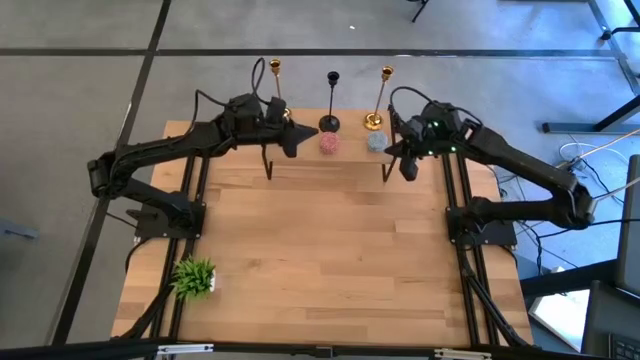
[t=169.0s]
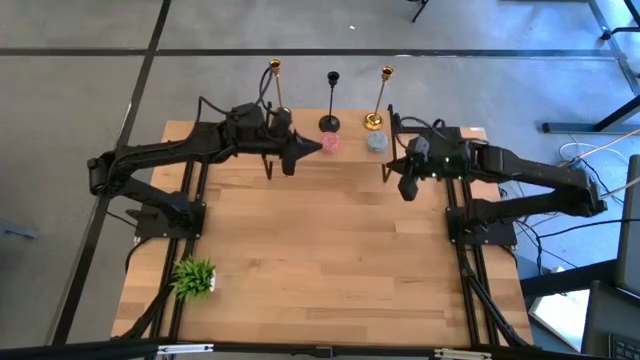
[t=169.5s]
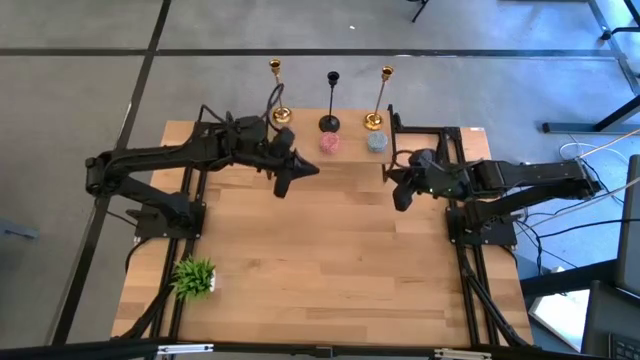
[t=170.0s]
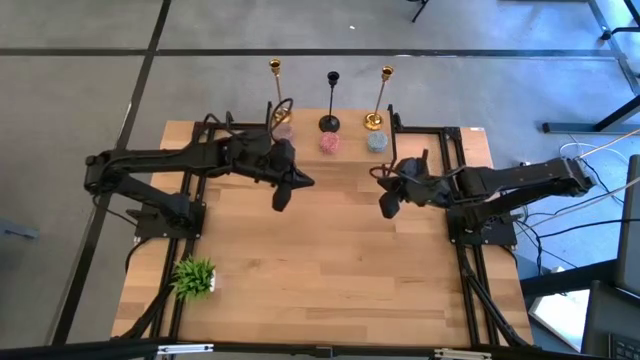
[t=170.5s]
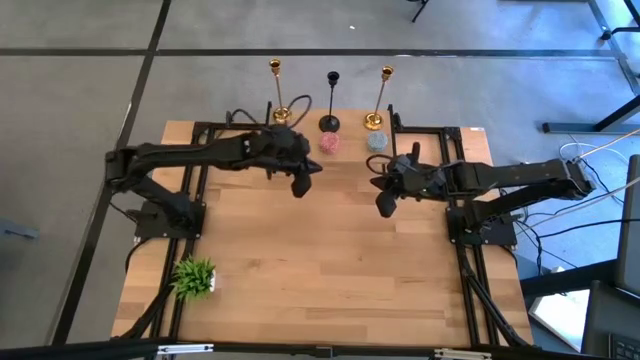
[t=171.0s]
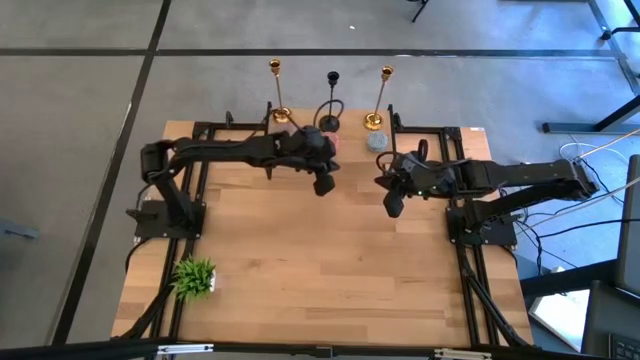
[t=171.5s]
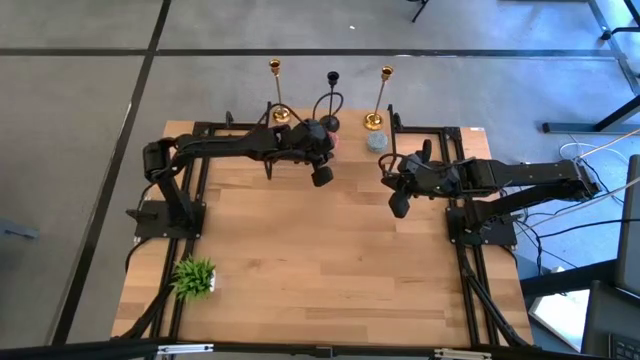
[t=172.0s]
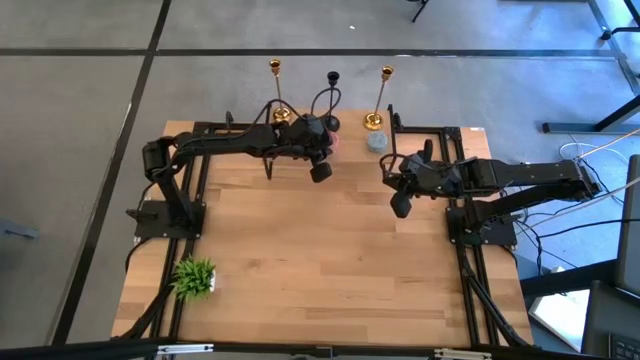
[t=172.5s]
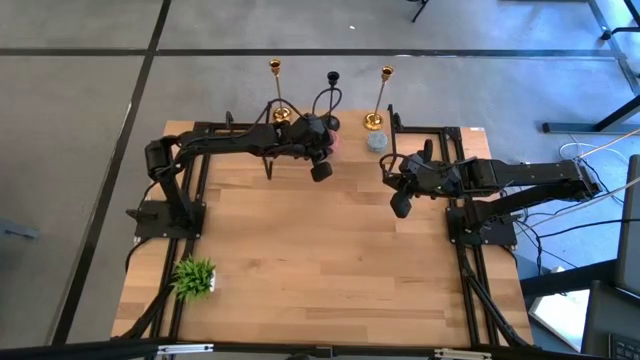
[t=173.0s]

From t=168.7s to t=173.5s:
Task: Pick & Place candle stick holders
Adjust the pink scented candle on the shelf

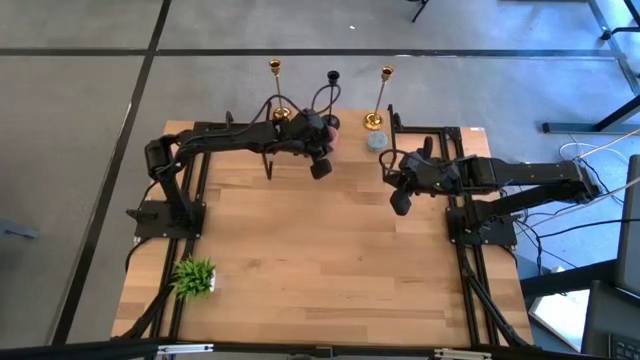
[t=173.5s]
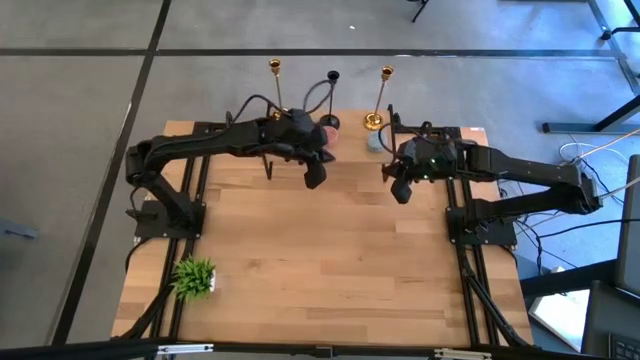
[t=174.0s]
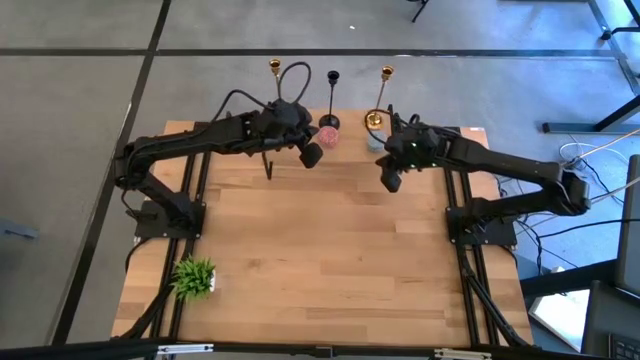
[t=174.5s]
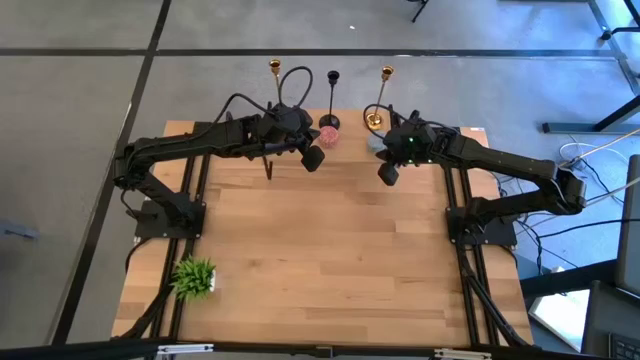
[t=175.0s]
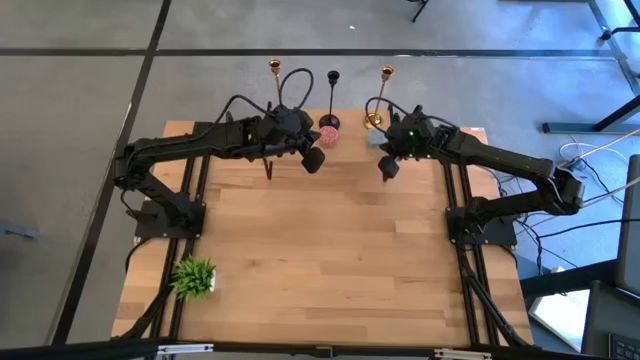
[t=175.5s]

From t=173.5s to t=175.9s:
Adjust the blue scented candle on the shelf

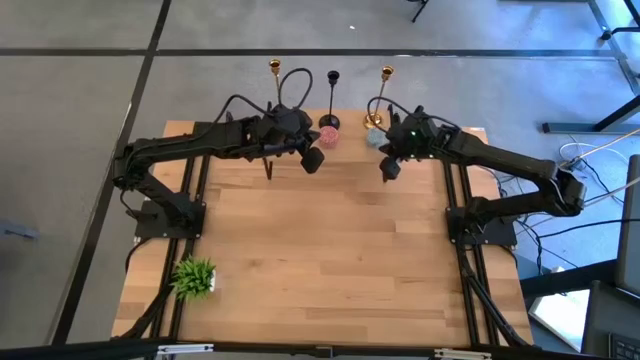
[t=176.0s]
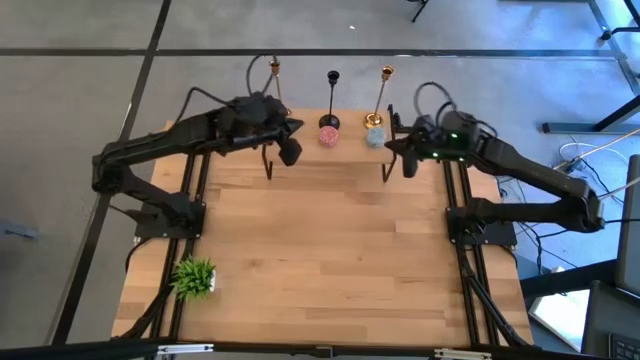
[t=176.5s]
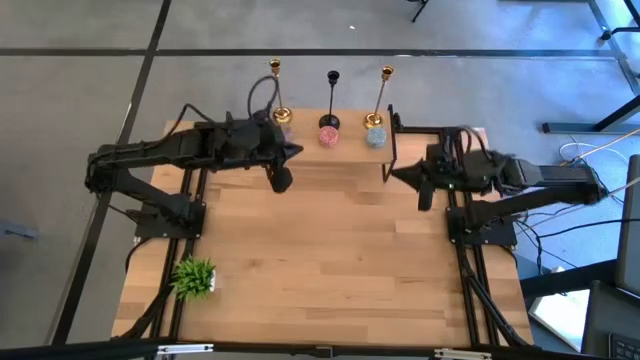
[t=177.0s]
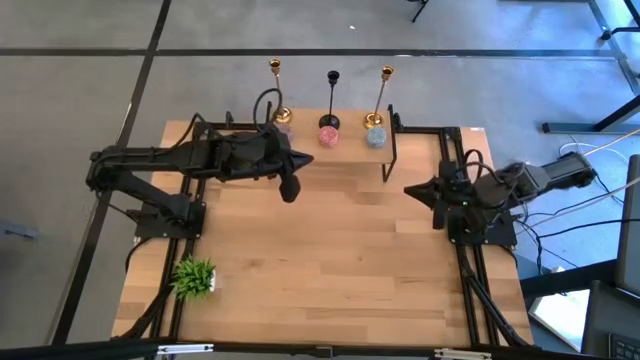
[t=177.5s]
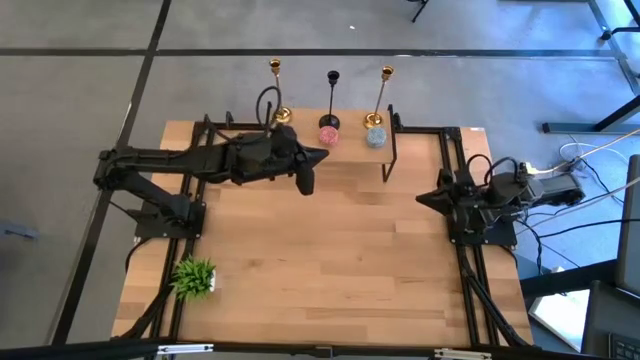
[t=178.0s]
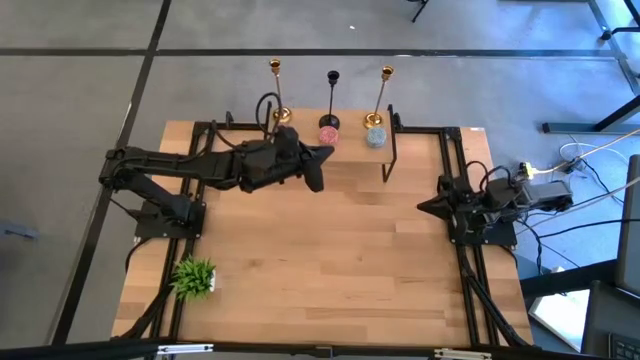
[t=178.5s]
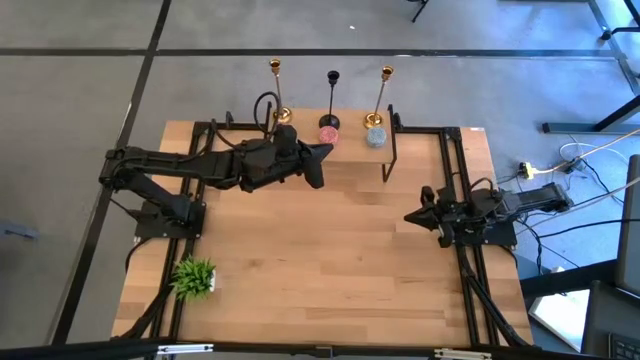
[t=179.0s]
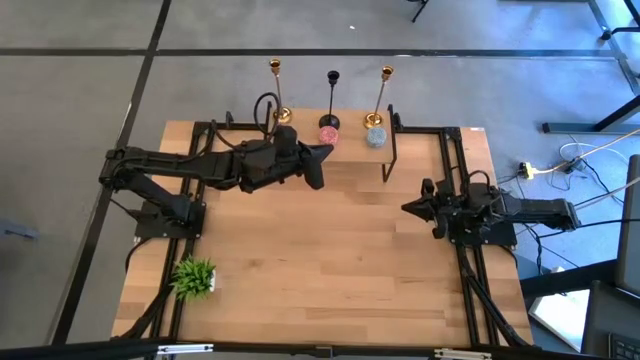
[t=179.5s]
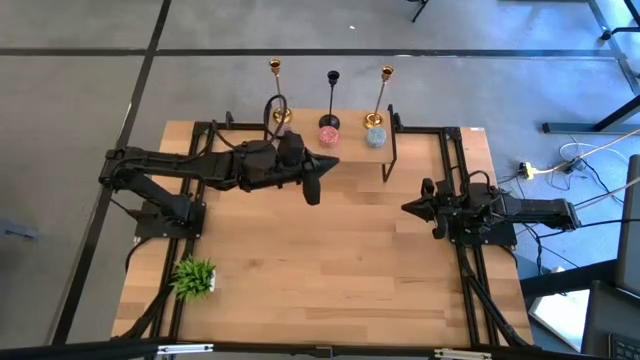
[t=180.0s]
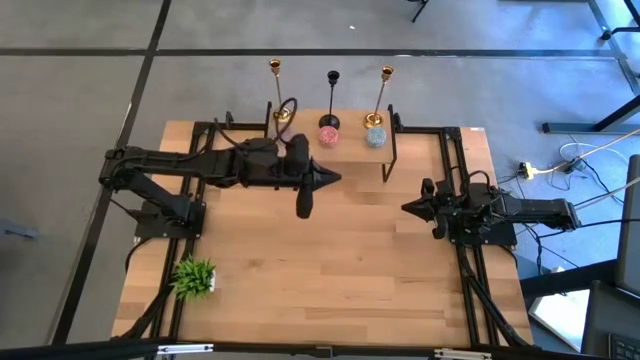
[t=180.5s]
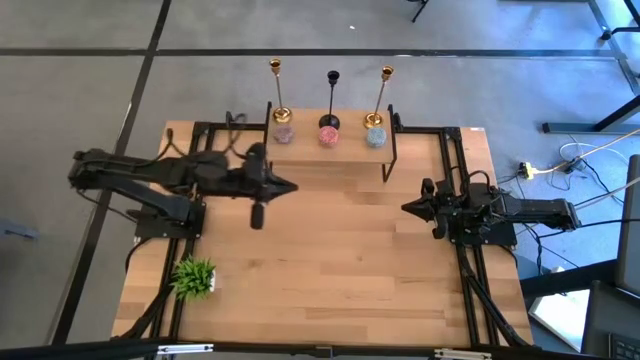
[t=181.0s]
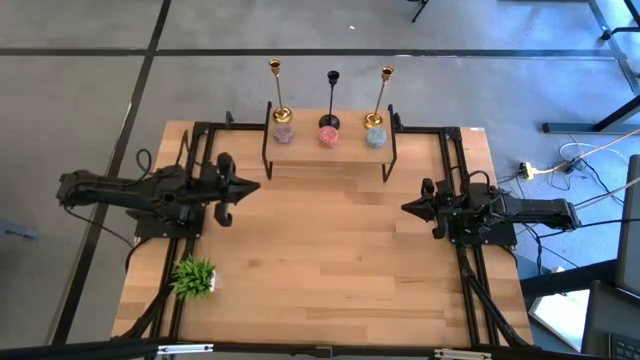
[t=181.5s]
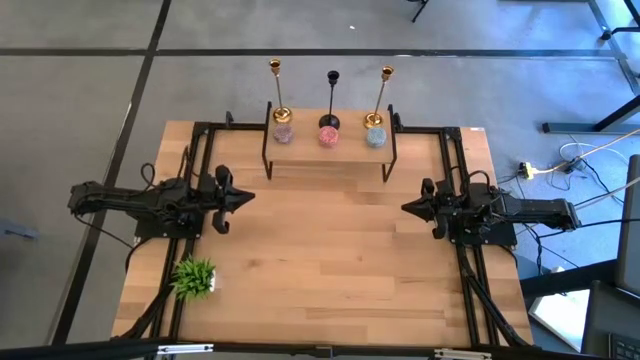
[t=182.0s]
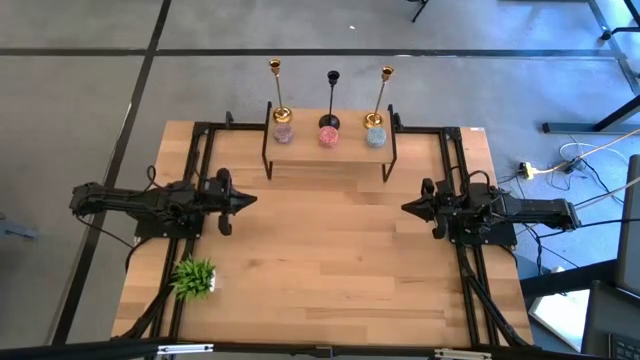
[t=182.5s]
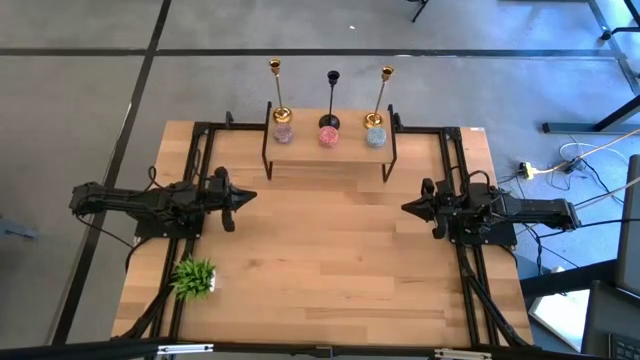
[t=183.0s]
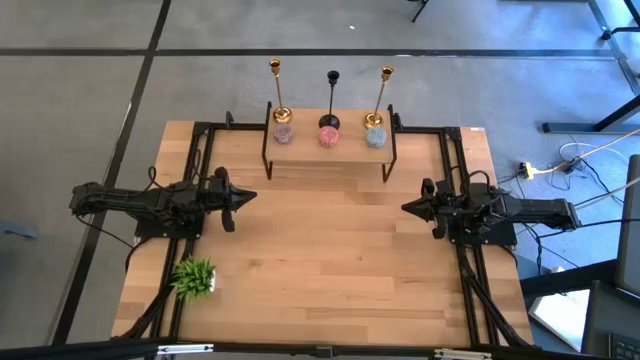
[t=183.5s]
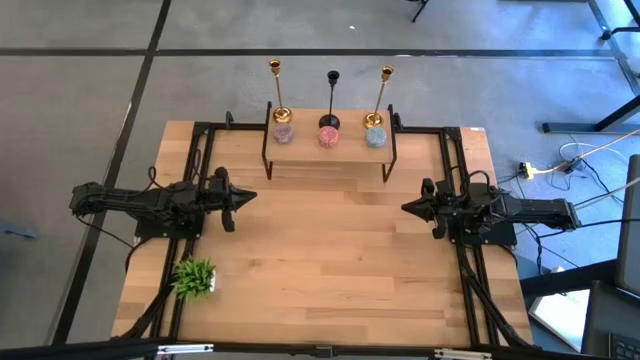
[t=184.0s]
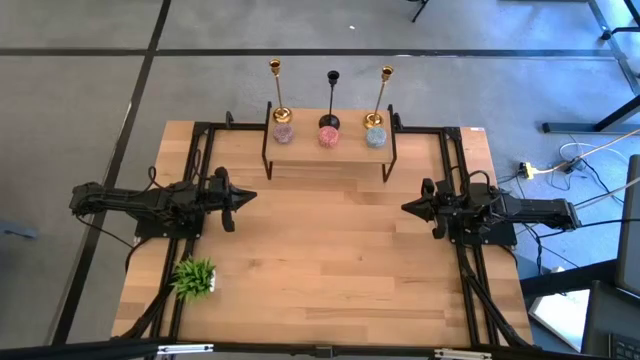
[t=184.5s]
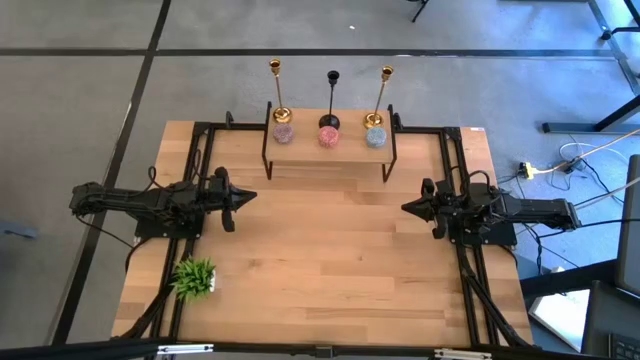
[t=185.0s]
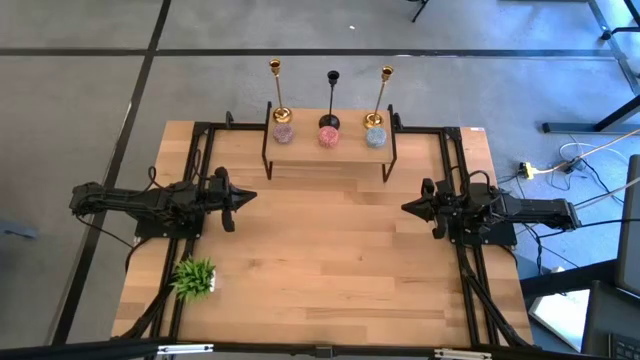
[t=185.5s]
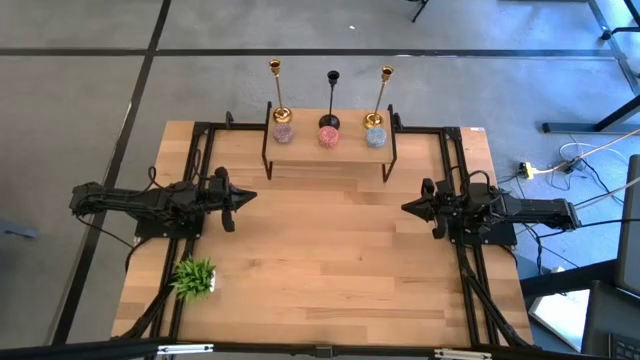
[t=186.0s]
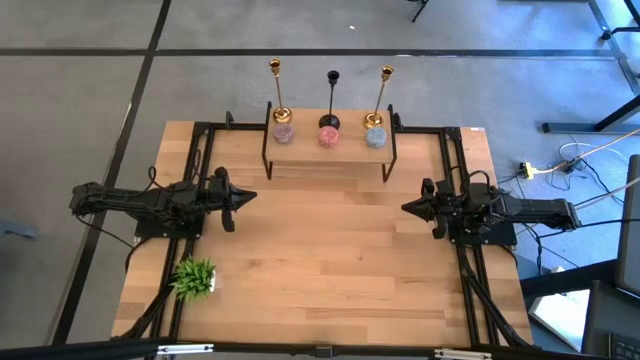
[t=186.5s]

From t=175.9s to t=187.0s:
Return to Home Position
